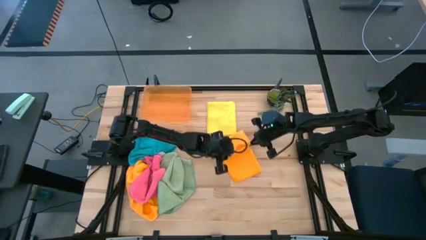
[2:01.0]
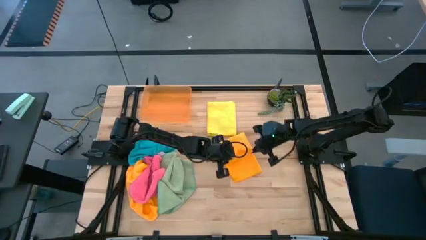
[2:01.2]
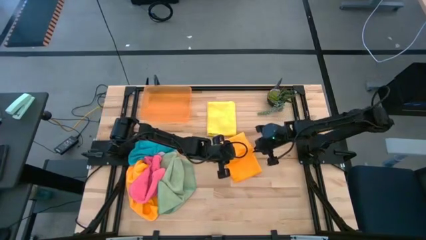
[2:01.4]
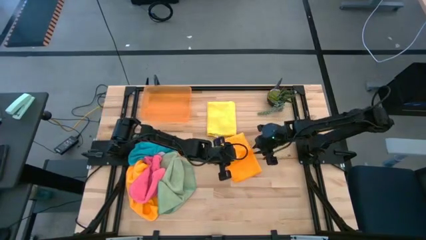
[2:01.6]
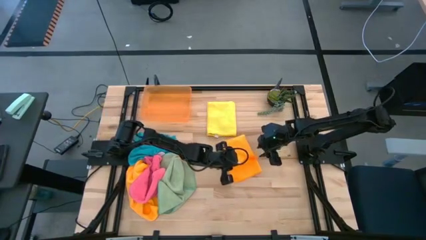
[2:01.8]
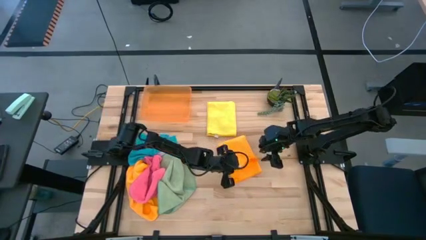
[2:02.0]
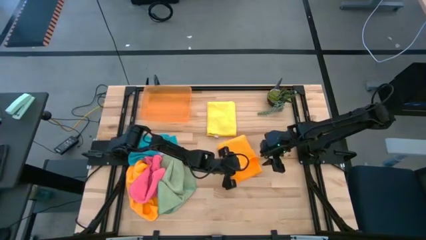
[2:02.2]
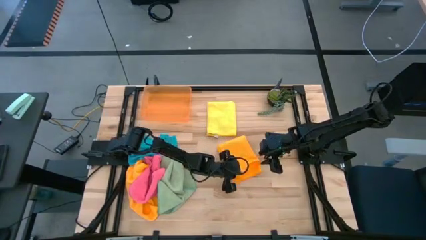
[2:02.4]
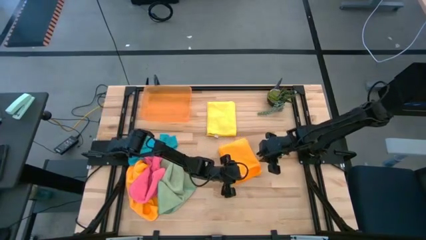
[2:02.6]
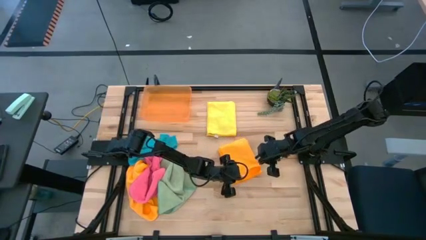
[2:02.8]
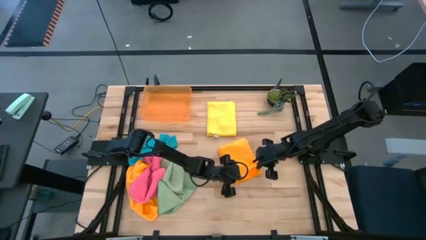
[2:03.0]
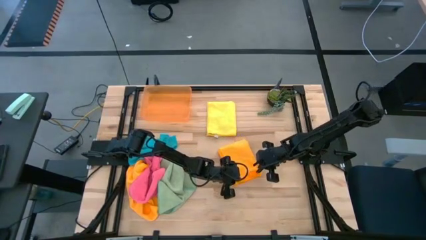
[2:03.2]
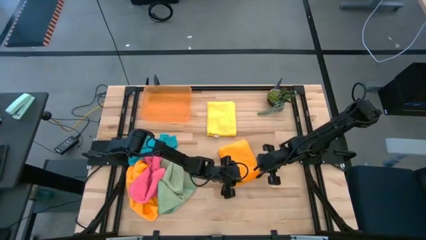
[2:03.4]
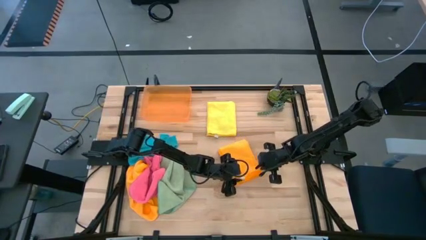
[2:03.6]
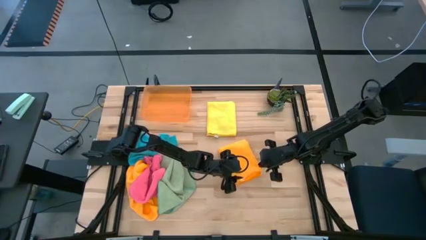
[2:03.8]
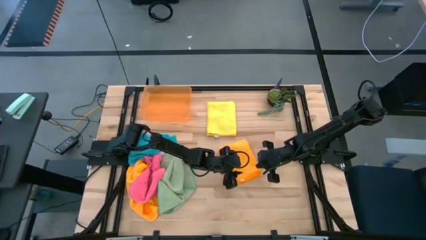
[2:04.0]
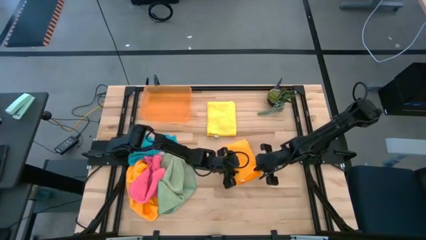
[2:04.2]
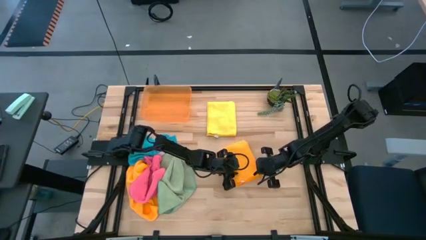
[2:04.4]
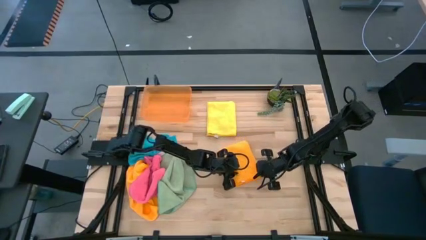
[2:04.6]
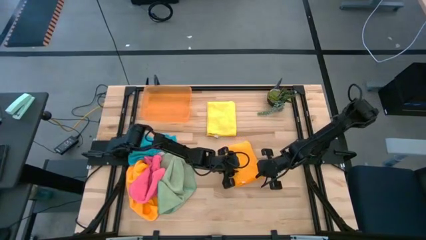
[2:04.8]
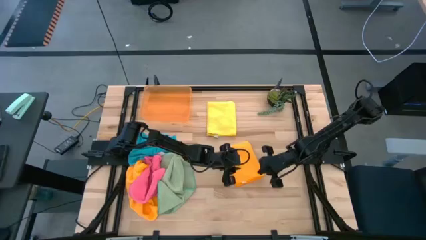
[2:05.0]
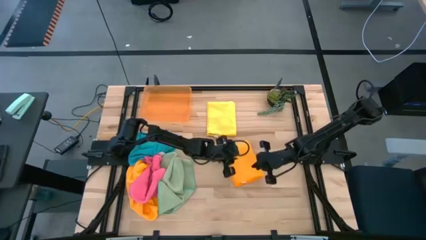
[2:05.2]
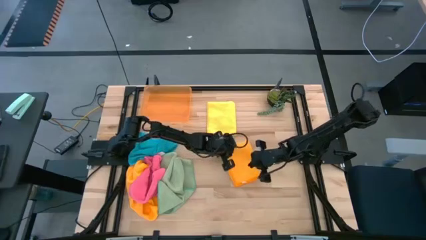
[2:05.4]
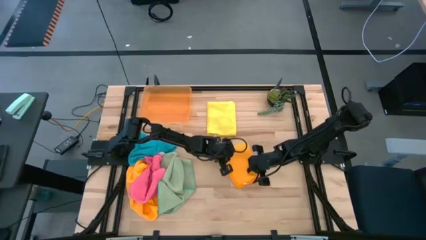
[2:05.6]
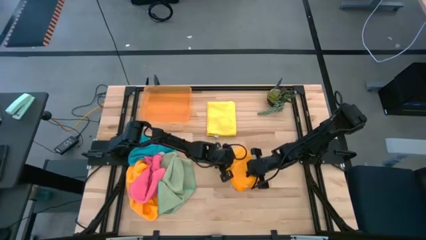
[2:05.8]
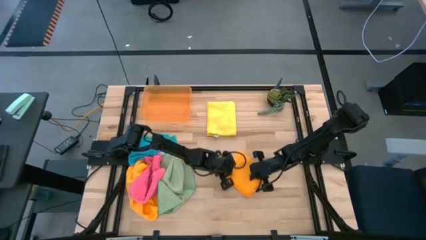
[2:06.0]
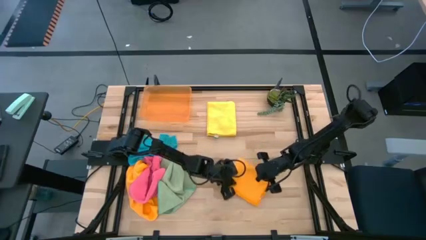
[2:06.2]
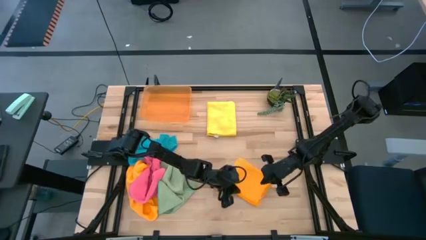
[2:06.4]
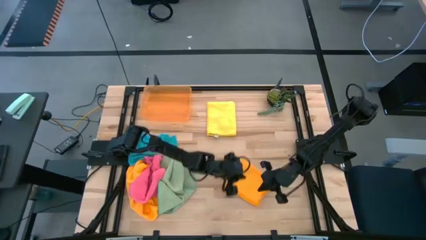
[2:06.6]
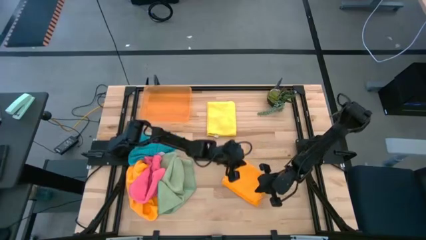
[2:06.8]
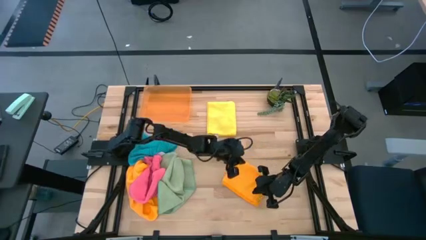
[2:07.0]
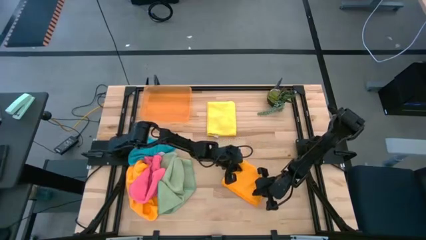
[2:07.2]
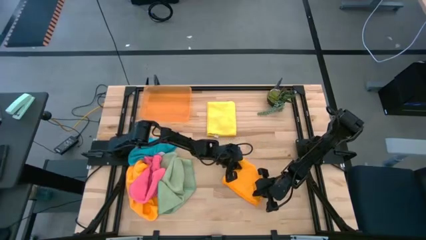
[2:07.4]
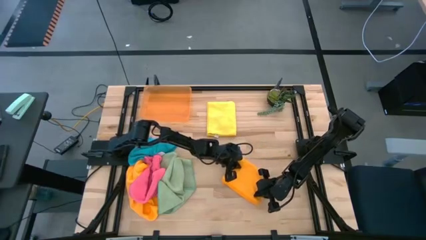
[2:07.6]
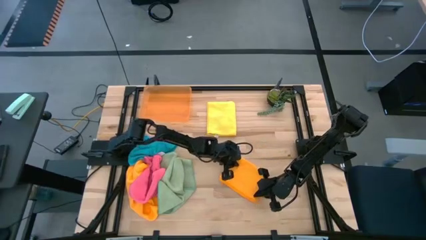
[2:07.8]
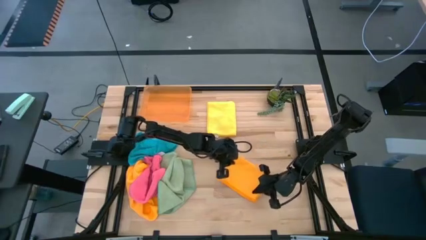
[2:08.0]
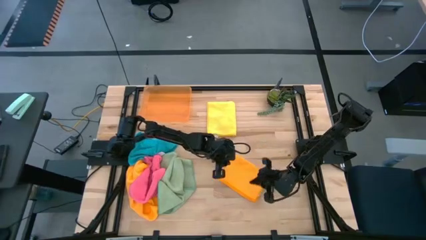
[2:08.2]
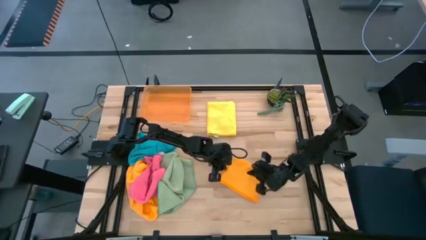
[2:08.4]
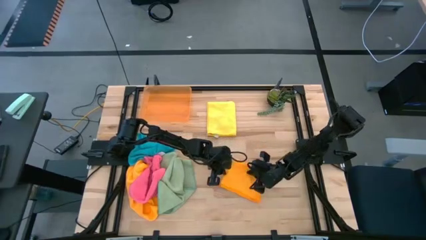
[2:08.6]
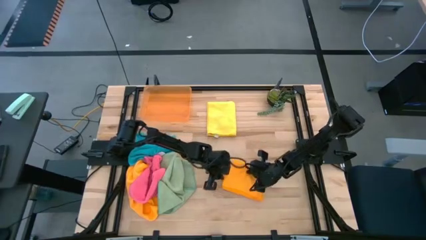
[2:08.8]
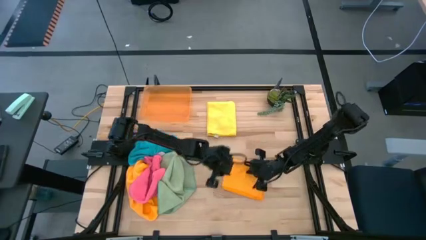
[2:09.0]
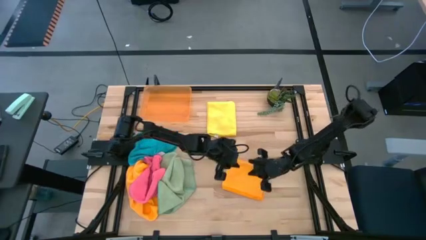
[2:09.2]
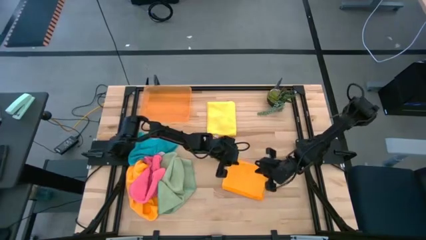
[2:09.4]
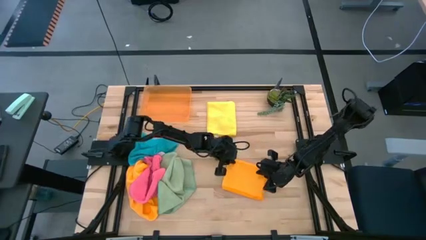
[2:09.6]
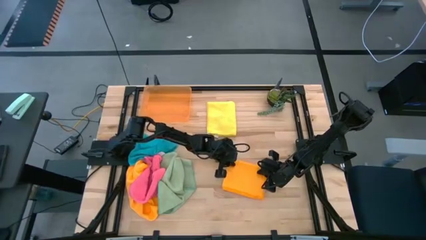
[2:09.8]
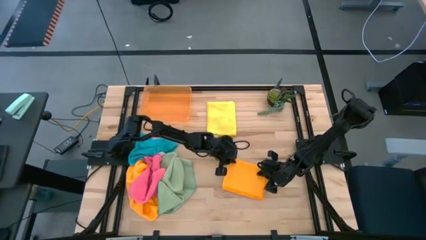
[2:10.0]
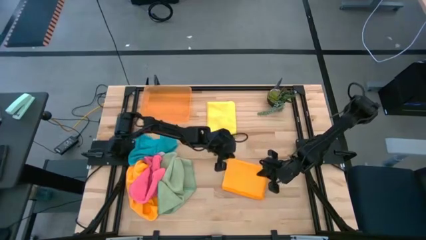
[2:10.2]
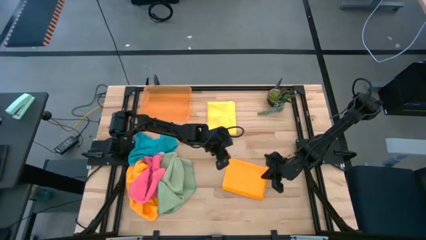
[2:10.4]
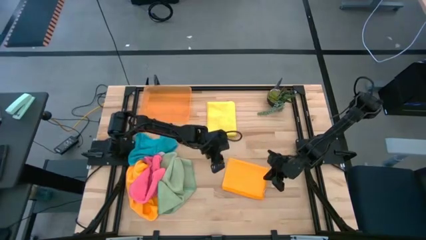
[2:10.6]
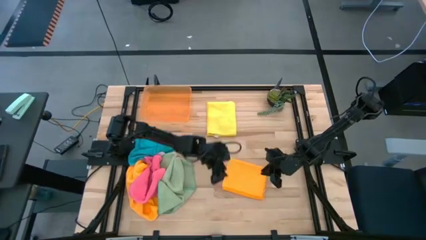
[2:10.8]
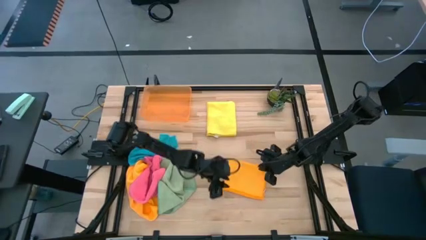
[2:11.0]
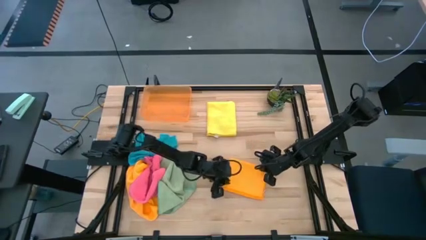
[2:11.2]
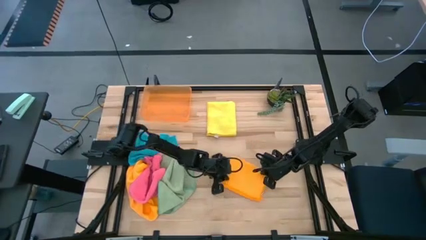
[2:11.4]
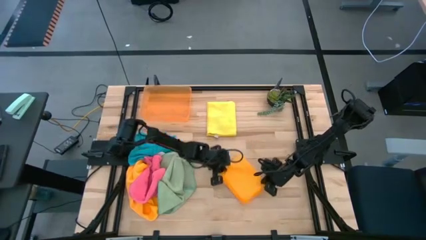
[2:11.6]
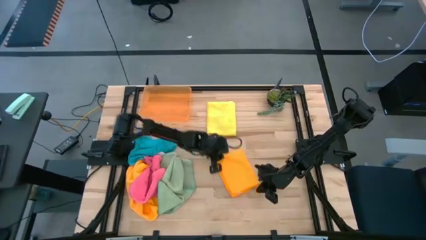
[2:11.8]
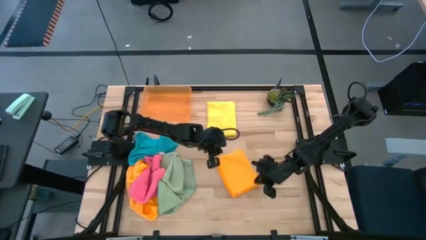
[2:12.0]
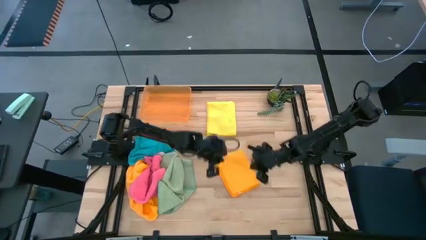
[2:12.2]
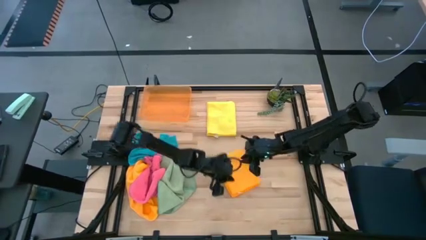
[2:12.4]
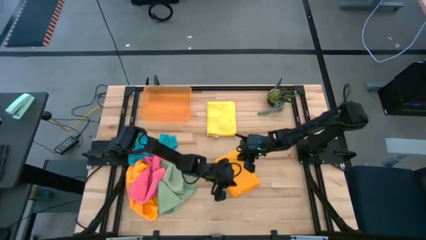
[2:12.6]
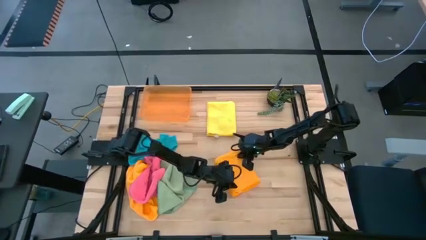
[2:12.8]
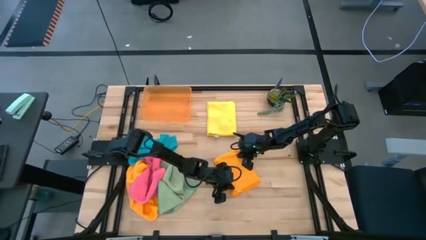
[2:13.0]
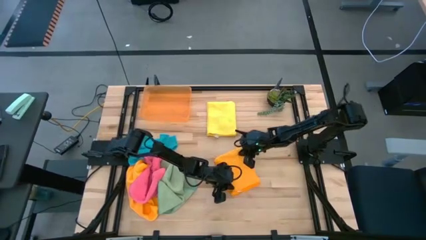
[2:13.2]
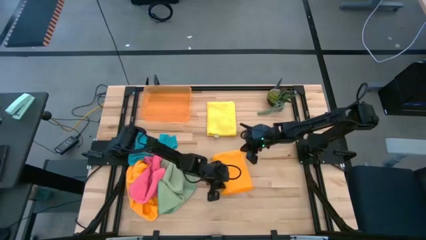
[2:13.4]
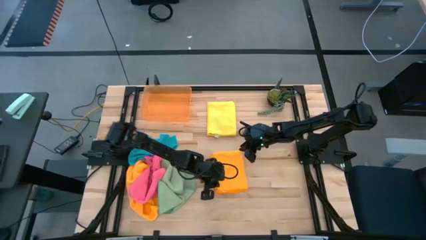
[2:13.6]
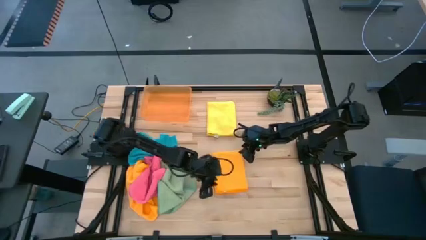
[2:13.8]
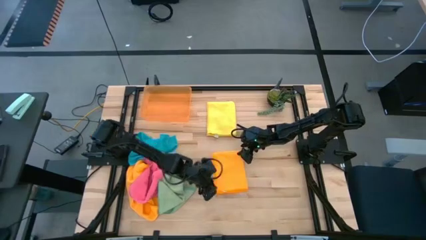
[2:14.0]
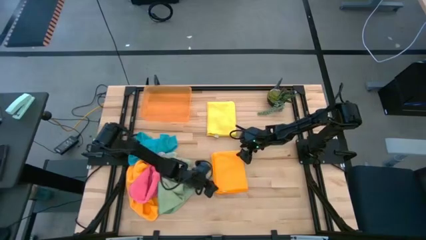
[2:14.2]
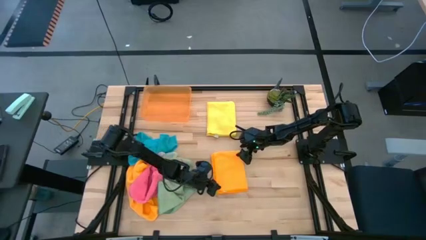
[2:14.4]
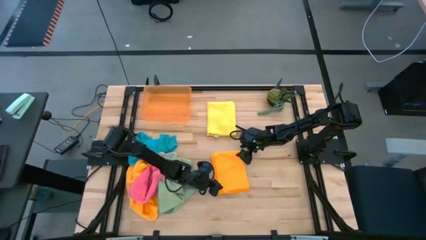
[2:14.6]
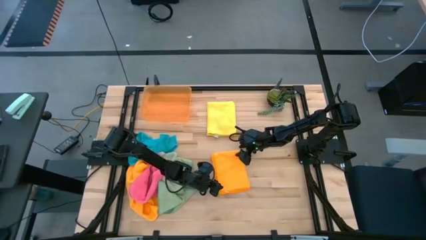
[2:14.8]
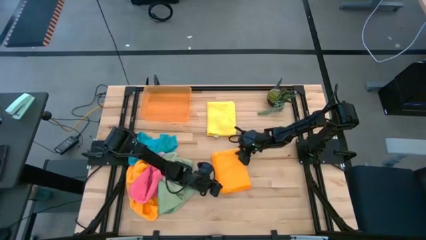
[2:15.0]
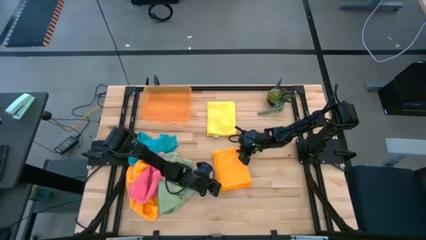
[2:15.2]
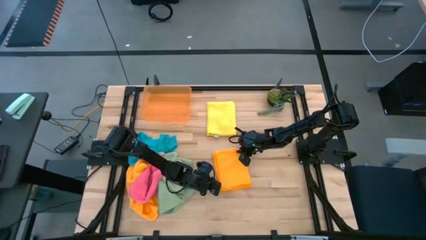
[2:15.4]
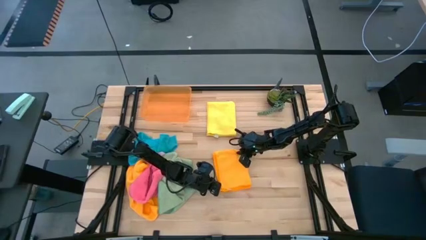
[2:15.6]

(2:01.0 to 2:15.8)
Task: Fold microfiber towels
Fold the right orange towel

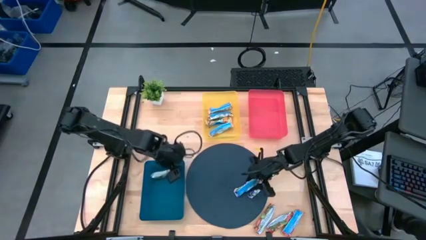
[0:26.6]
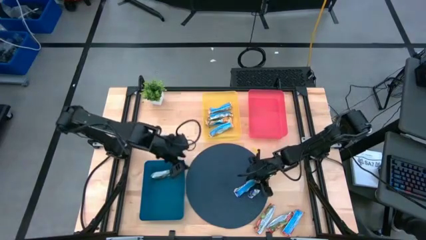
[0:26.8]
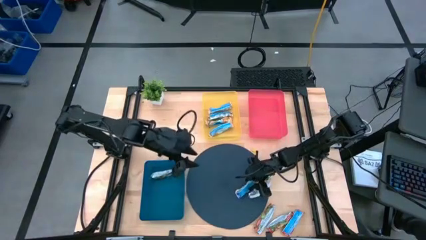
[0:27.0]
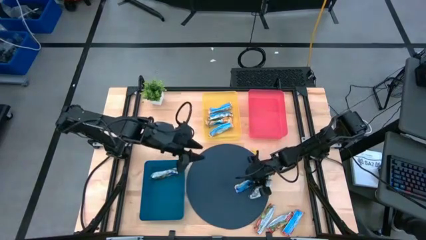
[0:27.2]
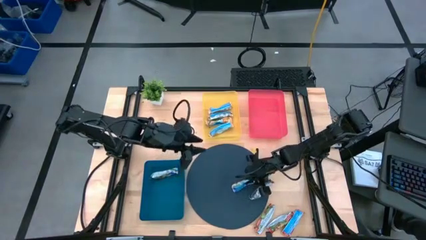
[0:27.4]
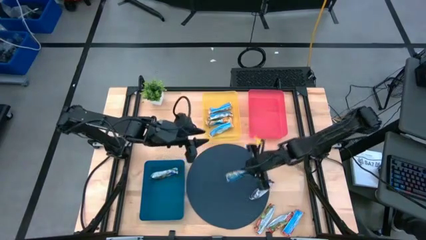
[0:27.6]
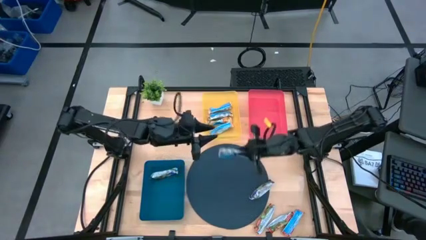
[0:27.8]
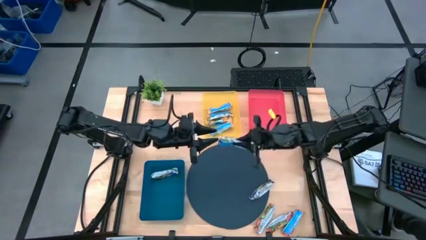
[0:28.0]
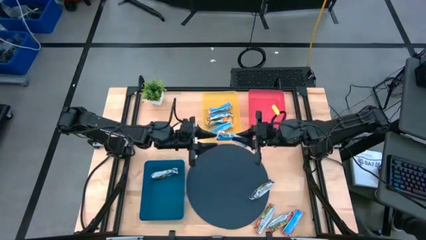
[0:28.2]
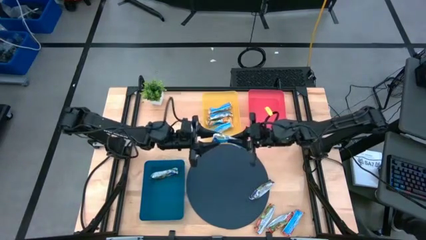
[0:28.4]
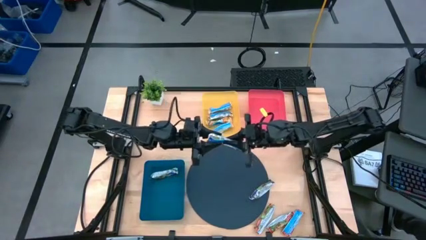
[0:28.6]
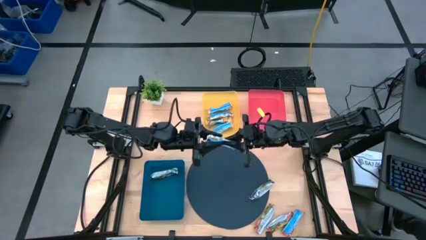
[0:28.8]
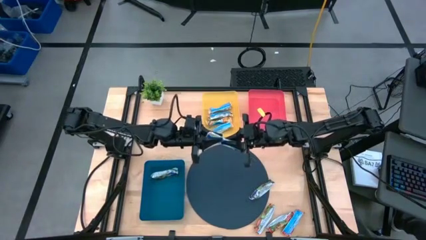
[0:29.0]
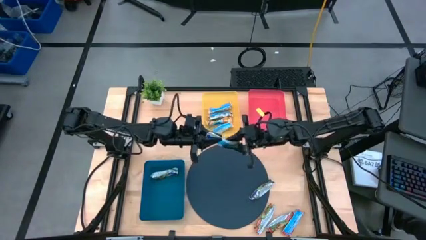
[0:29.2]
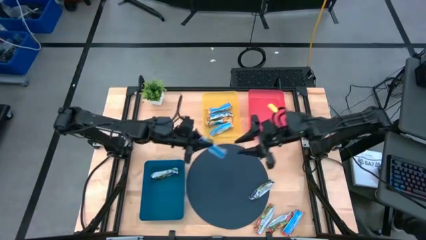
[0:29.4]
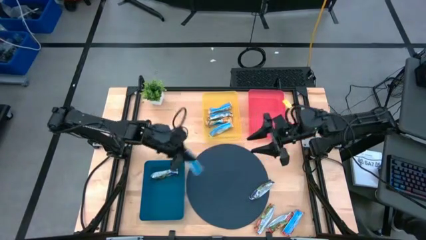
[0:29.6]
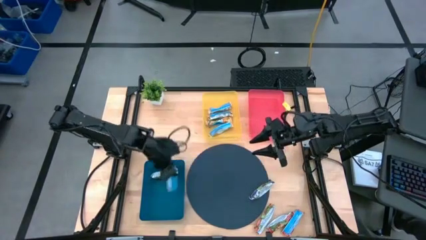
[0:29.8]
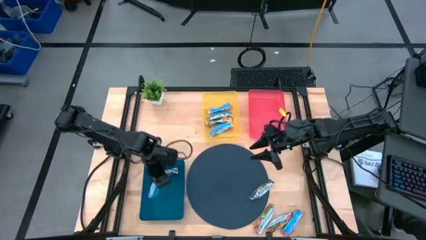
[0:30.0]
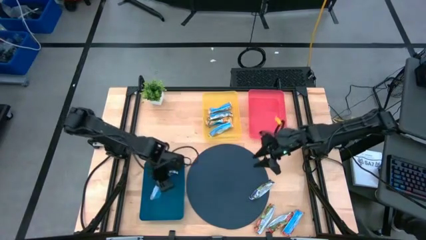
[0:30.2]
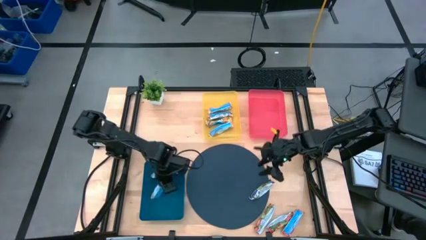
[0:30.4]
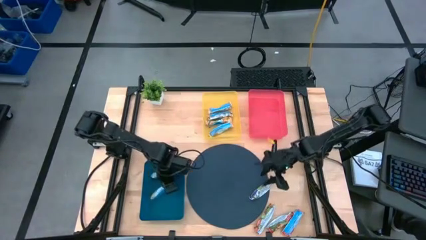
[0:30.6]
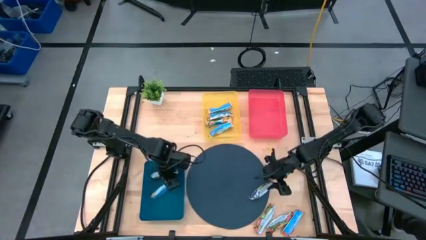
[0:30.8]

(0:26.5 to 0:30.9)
Task: Pick and place Granola Bars by type
Put the blue granola bar into the blue bin
